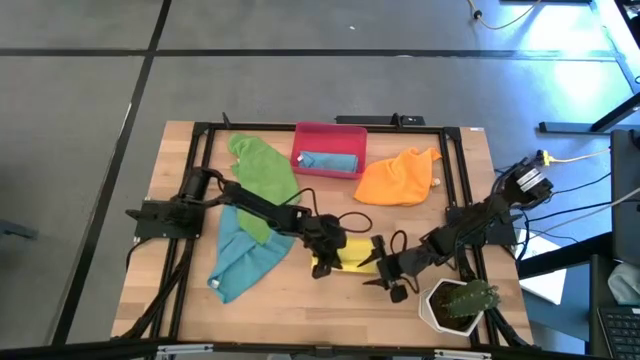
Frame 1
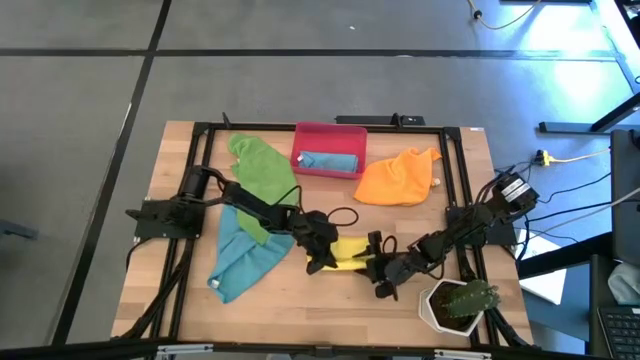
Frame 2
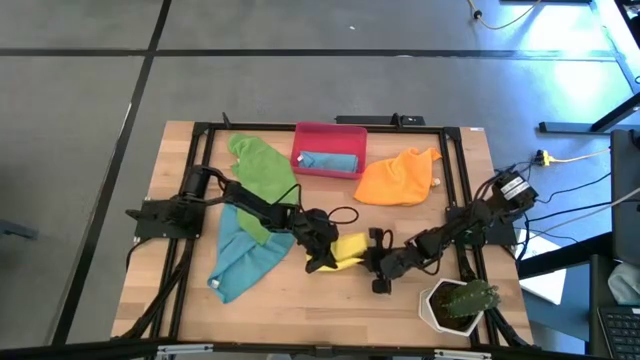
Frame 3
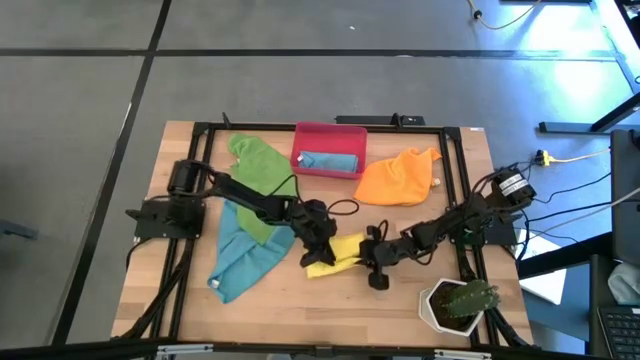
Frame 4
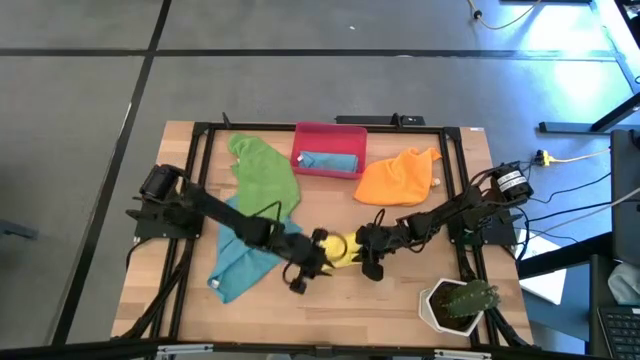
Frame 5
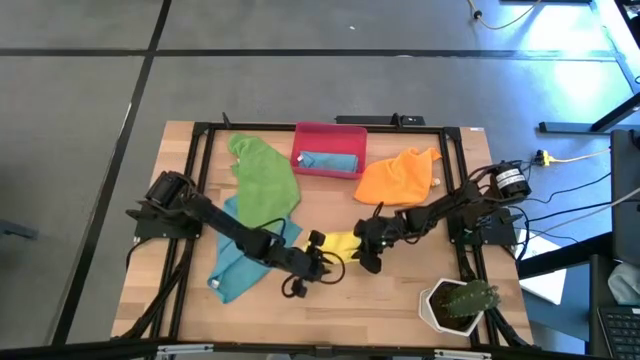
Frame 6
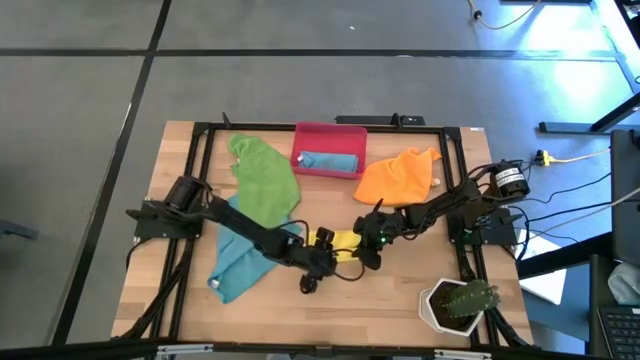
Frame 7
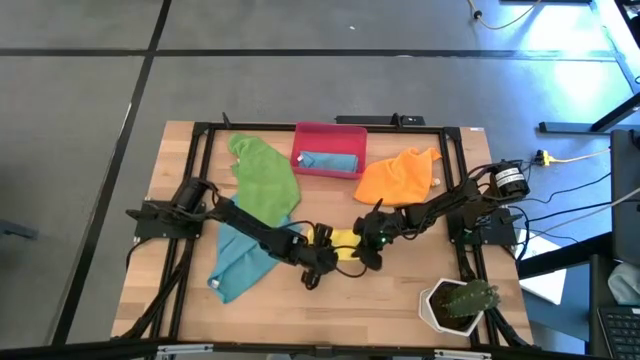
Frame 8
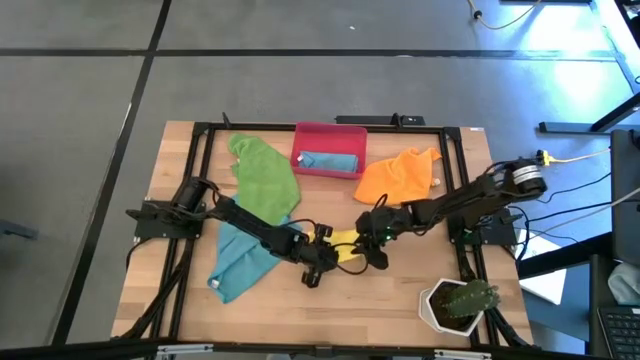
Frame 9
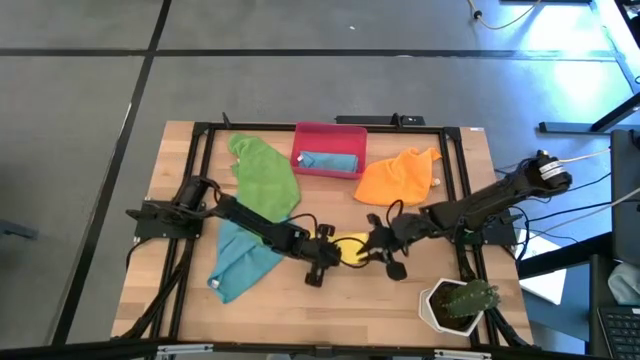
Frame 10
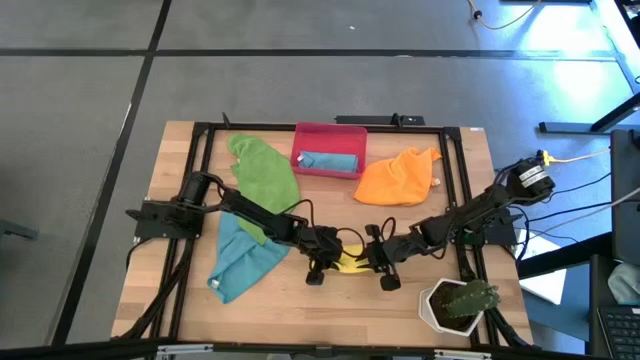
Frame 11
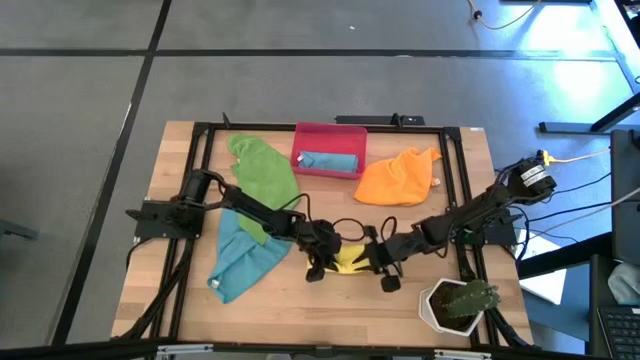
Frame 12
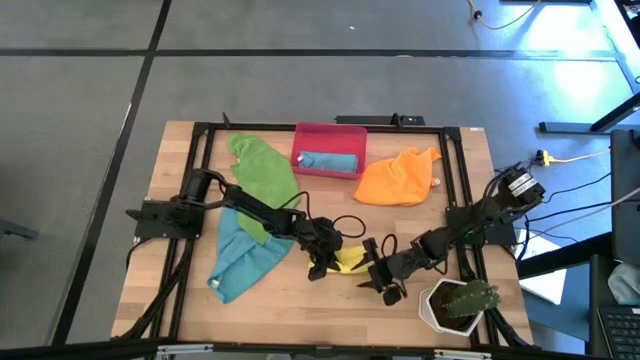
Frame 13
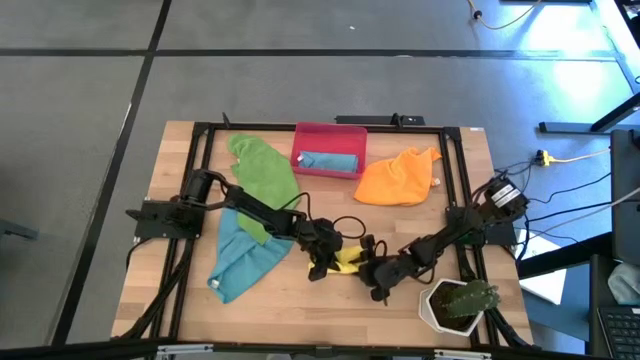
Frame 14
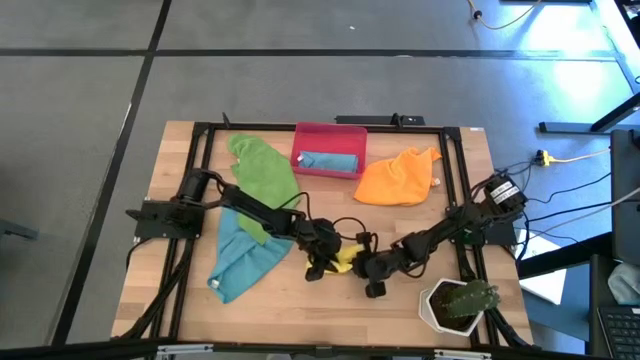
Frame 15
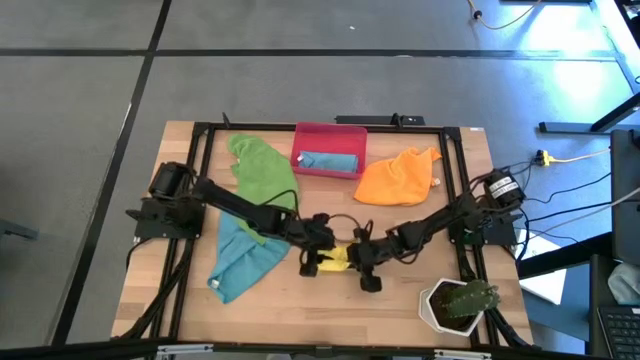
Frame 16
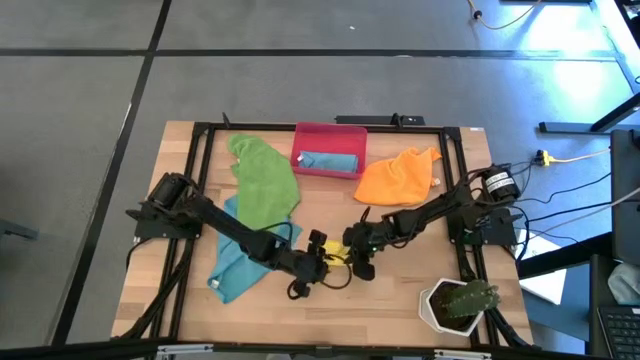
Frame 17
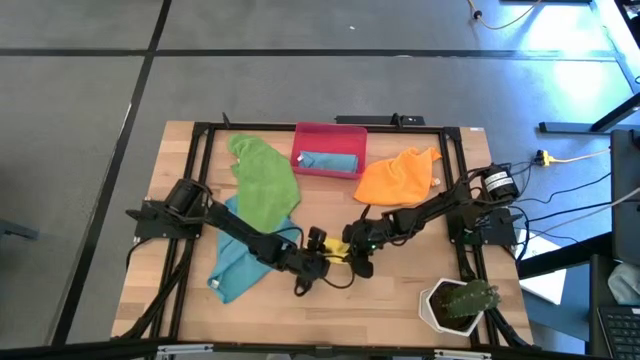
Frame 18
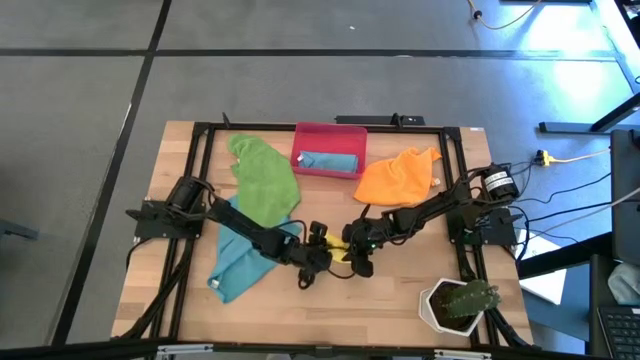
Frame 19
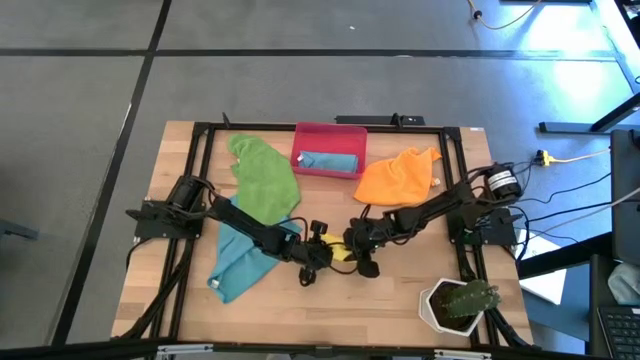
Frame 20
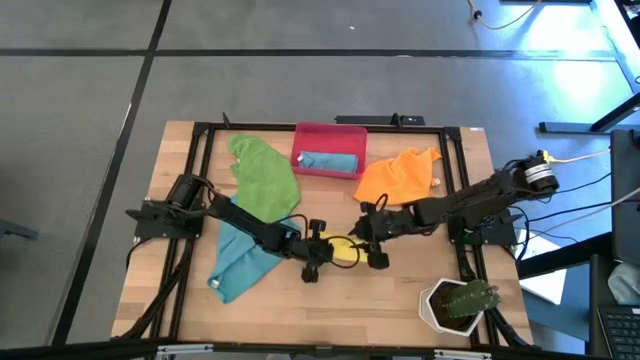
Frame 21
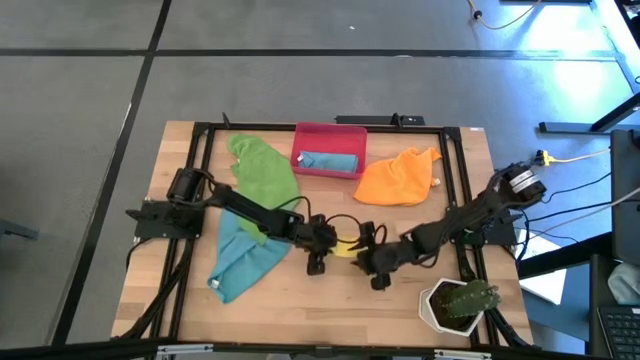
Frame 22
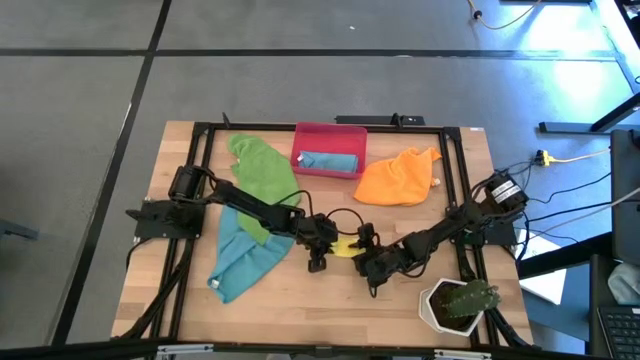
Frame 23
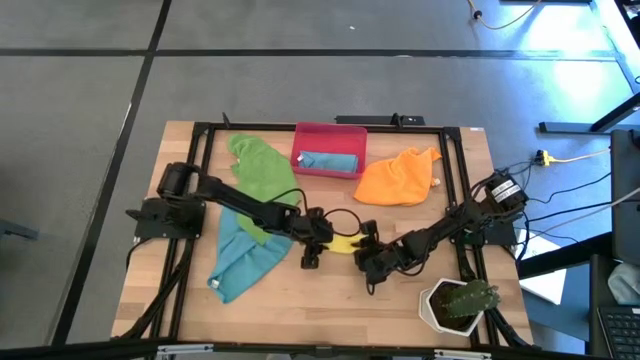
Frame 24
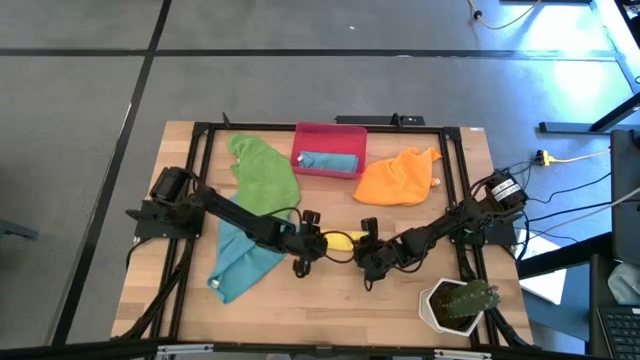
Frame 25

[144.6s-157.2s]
Task: Roll microfiber towels into tight, uniform cylinder then place into a basket
Roll the yellow microfiber towel

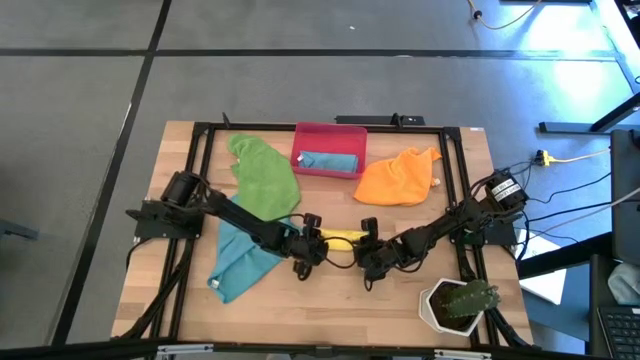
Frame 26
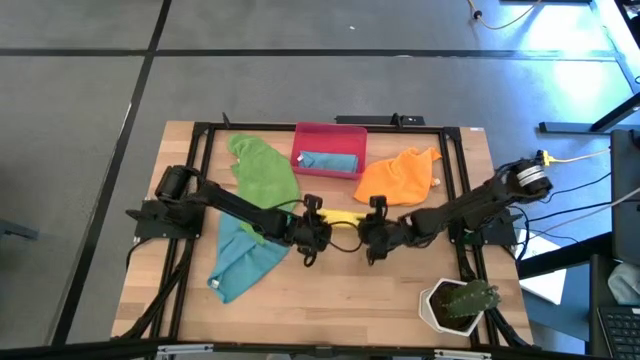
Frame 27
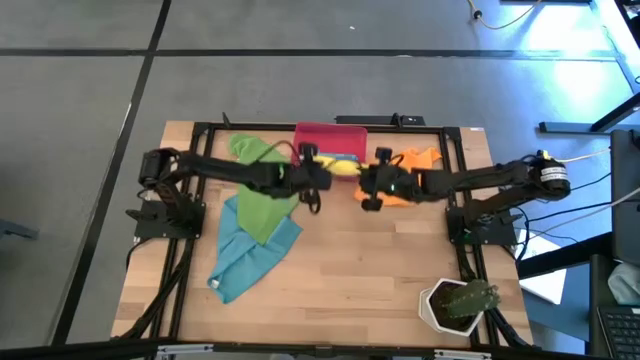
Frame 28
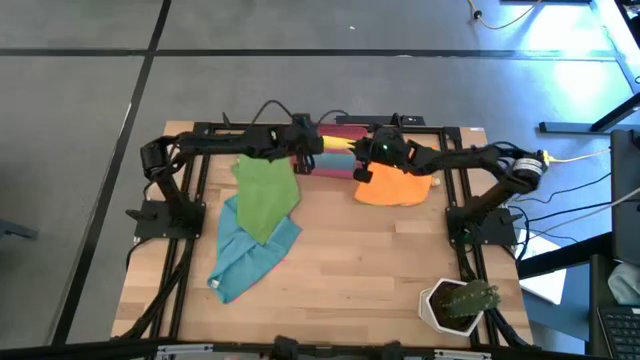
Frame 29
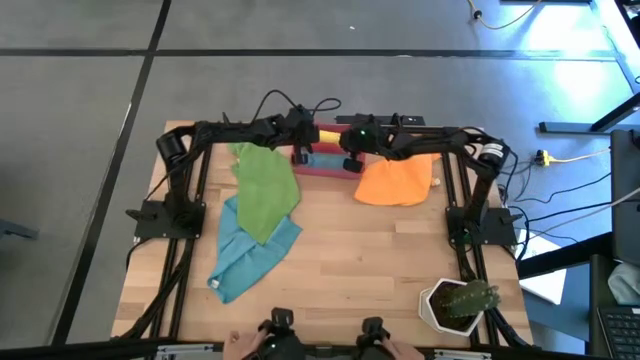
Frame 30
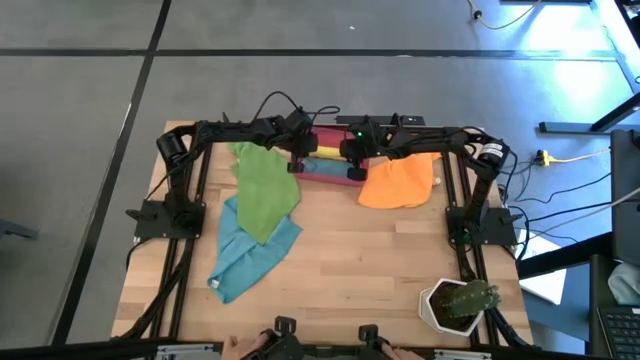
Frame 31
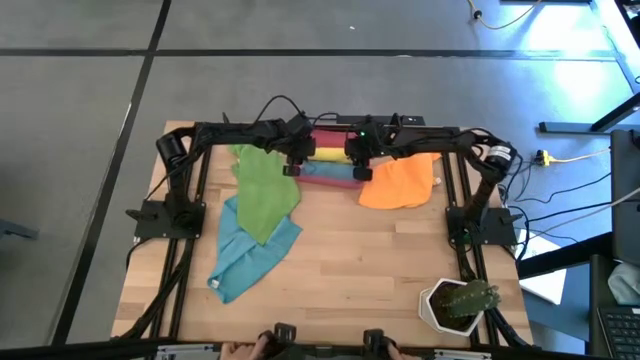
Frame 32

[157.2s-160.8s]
Put the yellow microfiber towel into the red bin

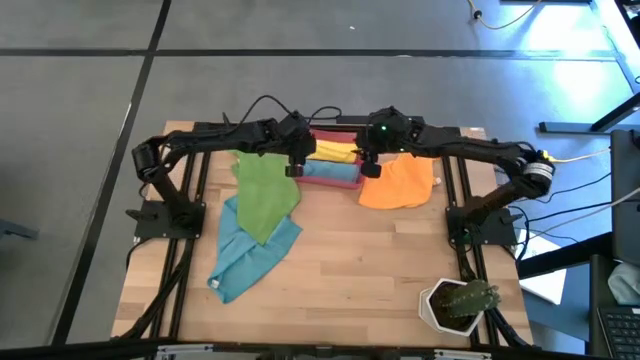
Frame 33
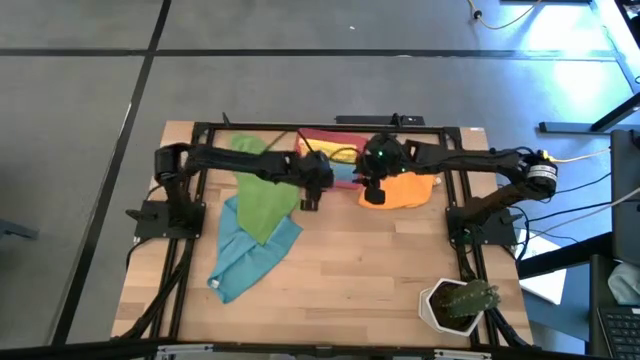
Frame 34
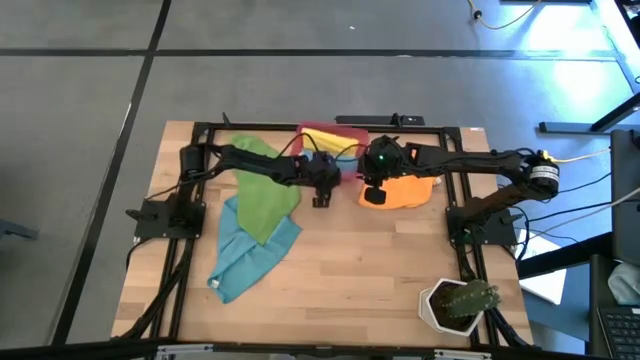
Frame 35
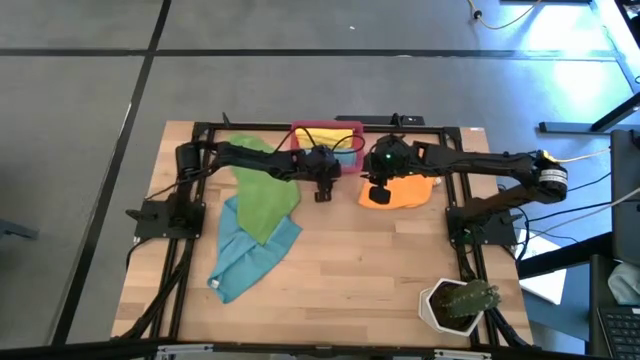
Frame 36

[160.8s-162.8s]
Adjust the red bin

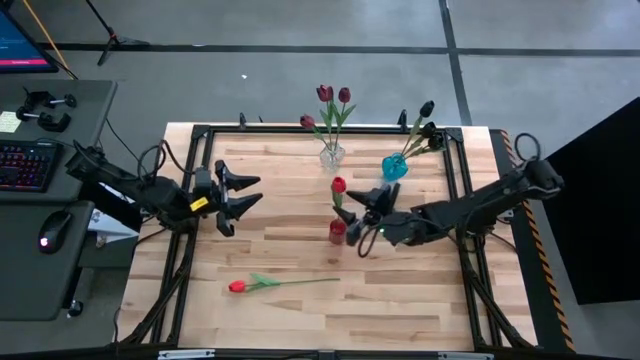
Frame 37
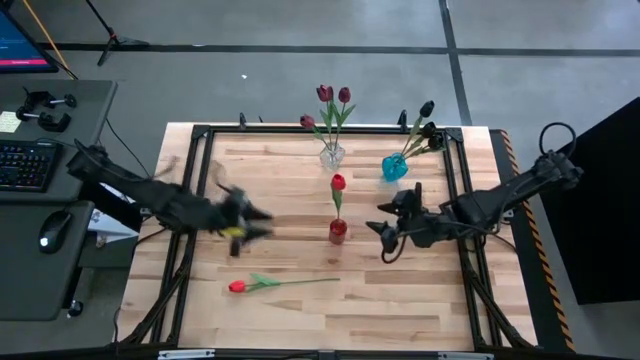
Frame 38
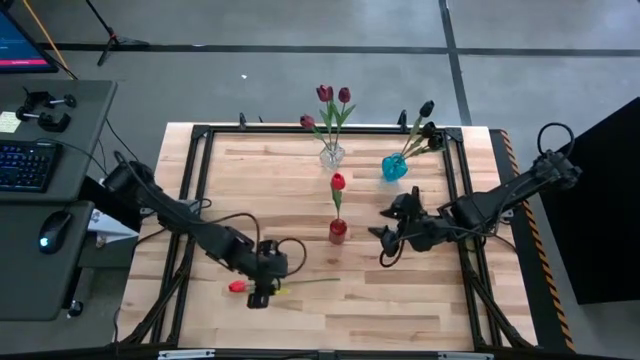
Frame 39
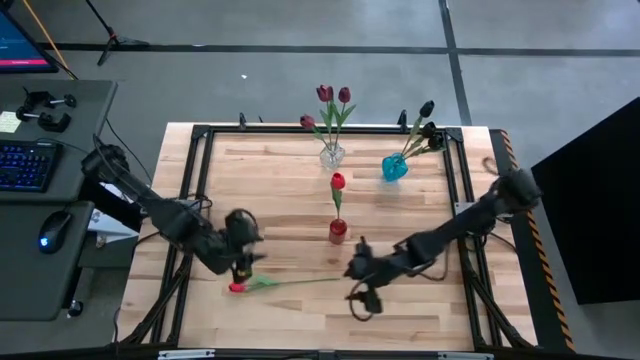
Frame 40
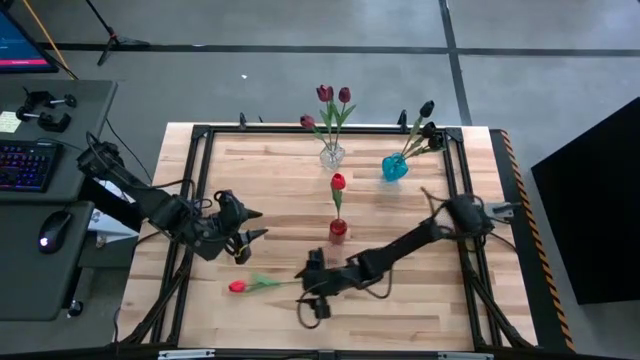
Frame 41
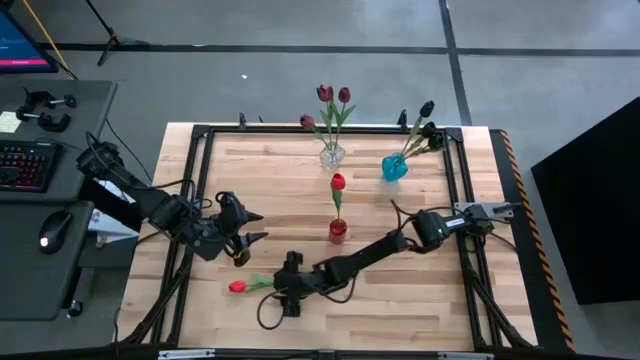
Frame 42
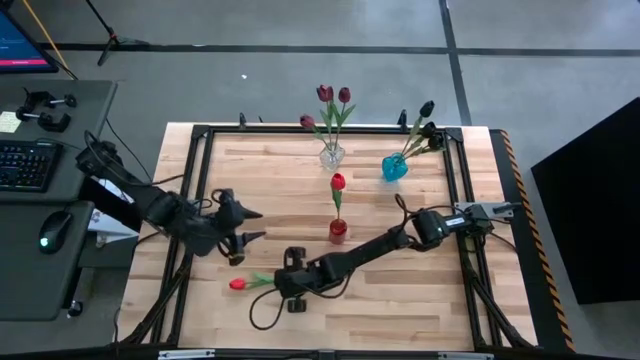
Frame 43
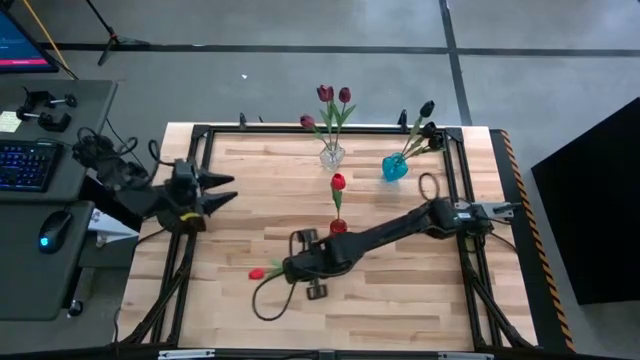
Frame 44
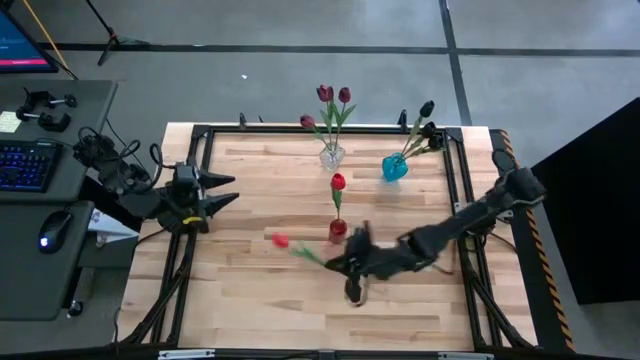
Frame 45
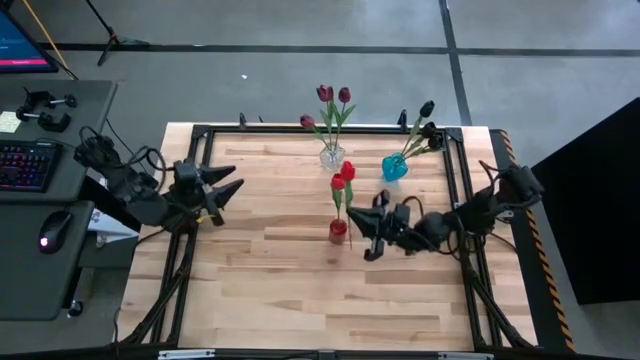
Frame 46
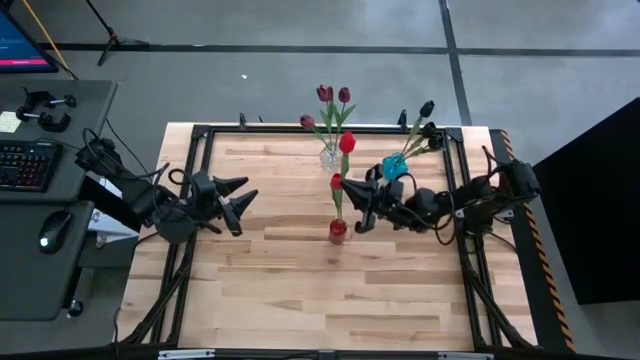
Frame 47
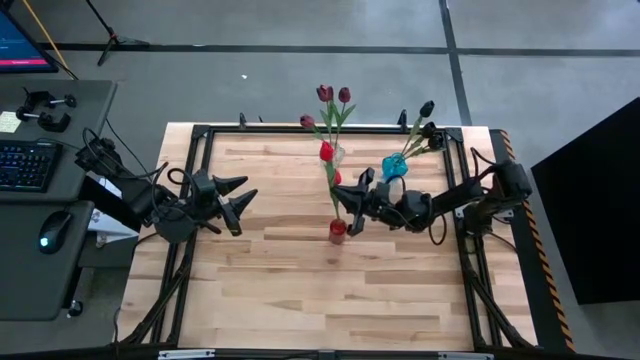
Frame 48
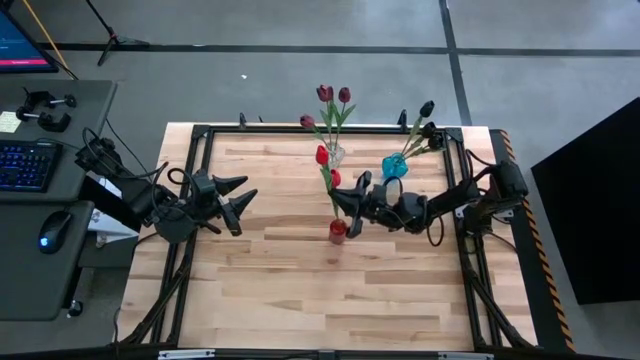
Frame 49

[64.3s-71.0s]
Task: Sort flowers into vase by color
Put the red flower into the red vase
